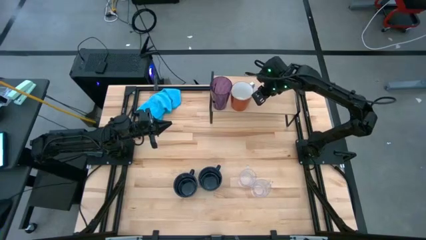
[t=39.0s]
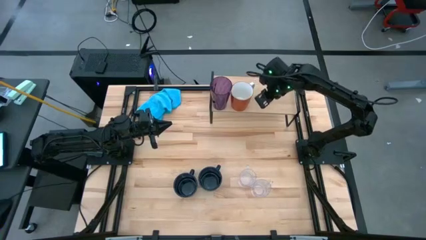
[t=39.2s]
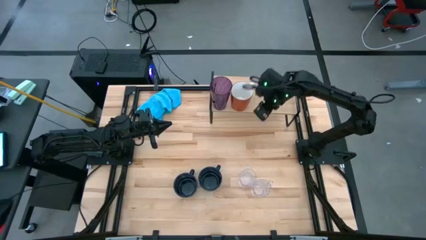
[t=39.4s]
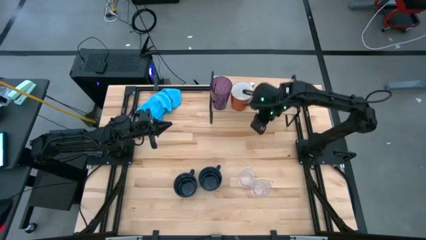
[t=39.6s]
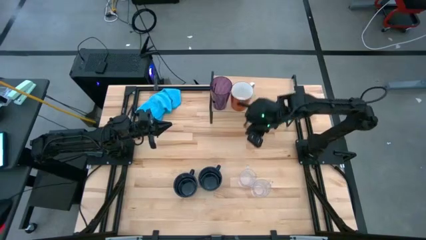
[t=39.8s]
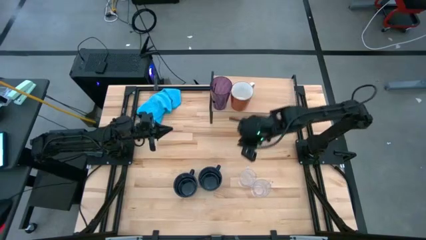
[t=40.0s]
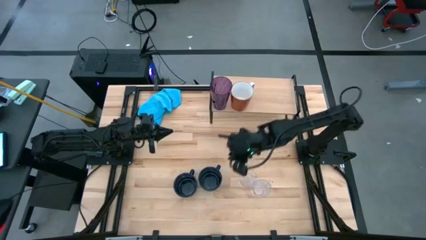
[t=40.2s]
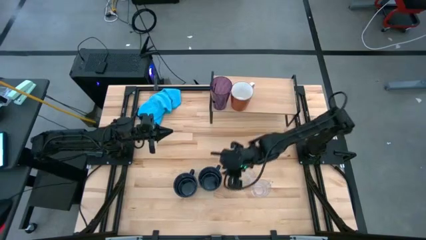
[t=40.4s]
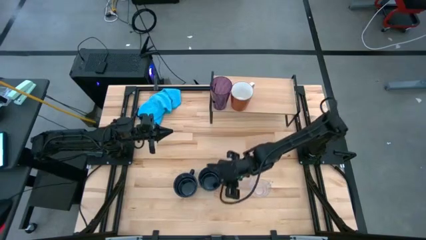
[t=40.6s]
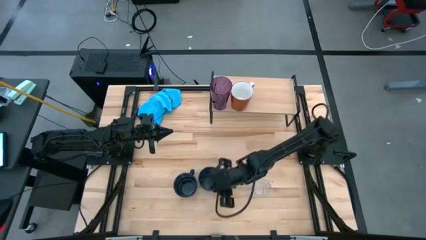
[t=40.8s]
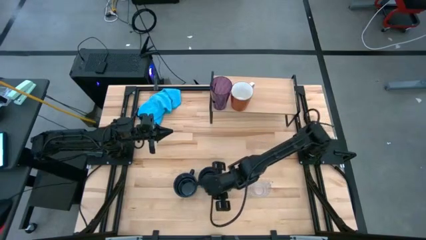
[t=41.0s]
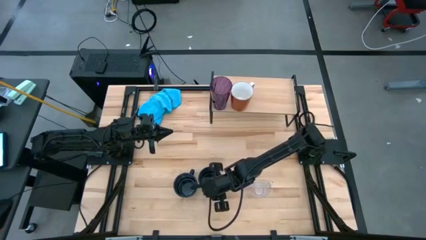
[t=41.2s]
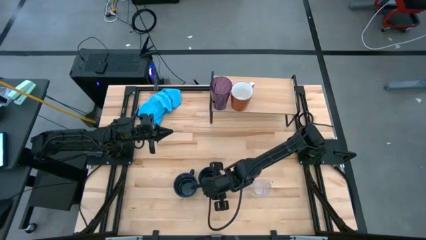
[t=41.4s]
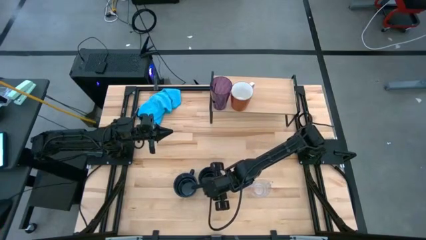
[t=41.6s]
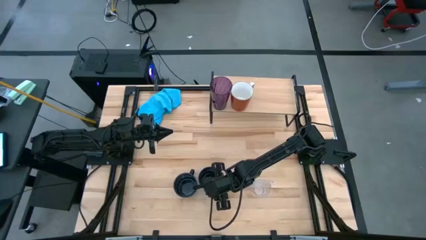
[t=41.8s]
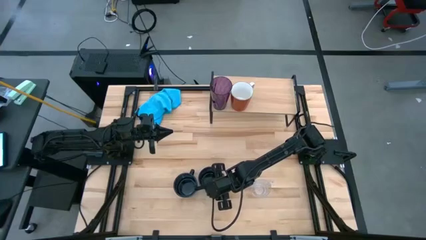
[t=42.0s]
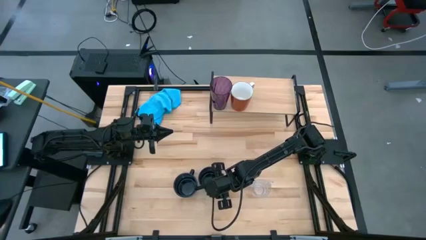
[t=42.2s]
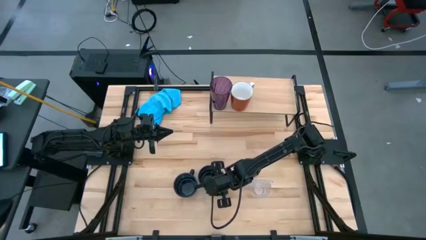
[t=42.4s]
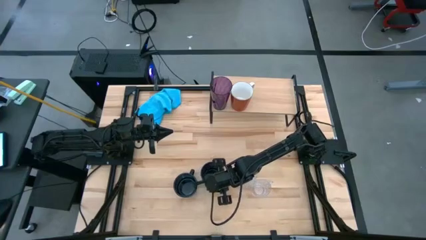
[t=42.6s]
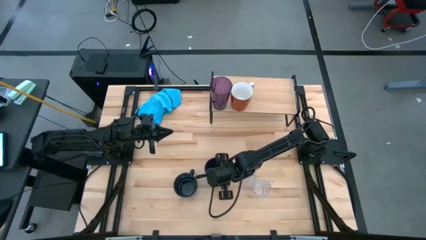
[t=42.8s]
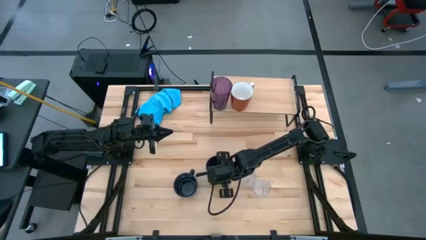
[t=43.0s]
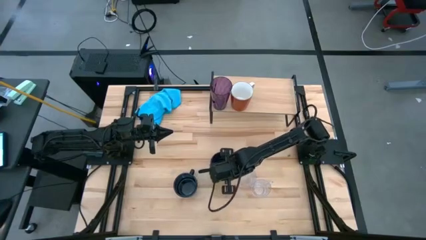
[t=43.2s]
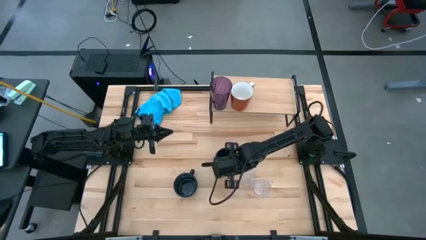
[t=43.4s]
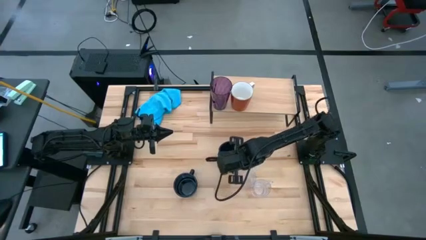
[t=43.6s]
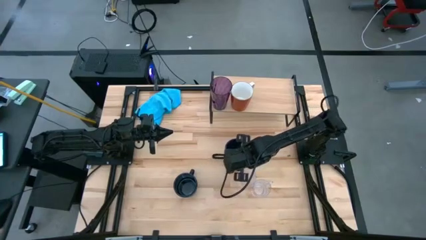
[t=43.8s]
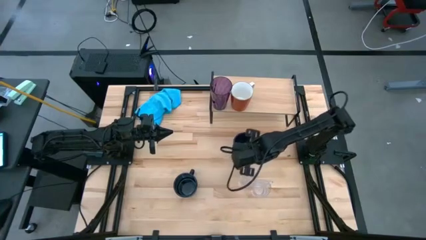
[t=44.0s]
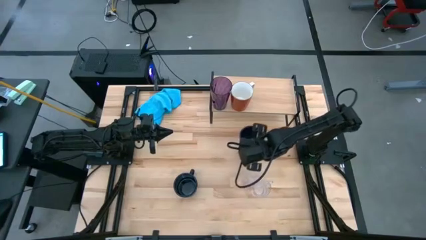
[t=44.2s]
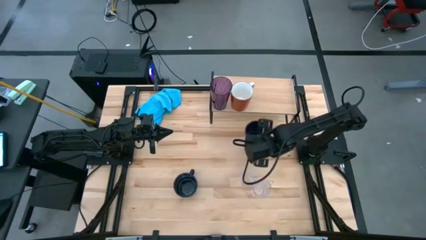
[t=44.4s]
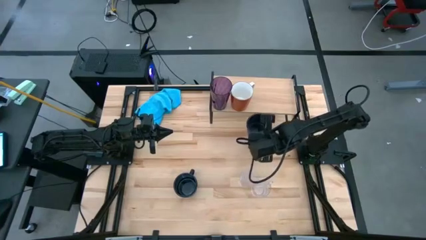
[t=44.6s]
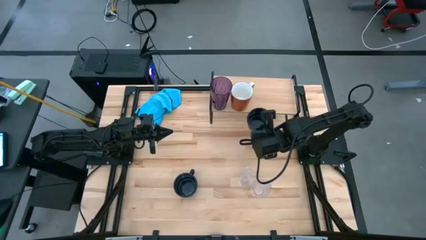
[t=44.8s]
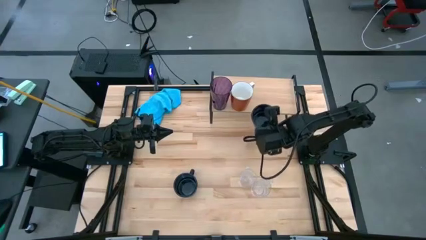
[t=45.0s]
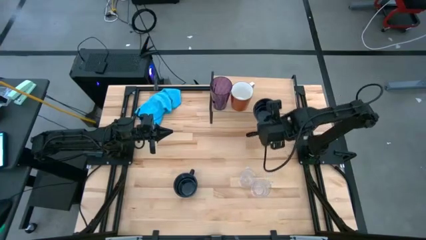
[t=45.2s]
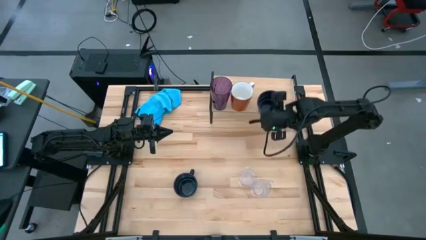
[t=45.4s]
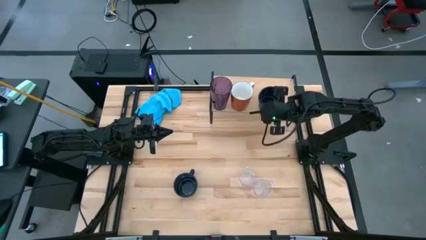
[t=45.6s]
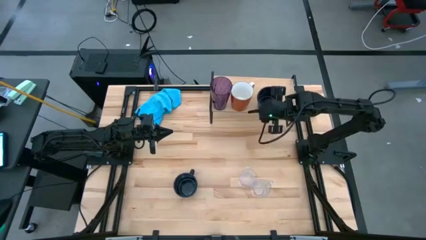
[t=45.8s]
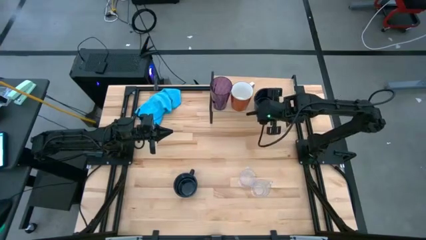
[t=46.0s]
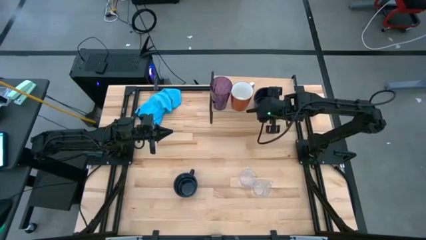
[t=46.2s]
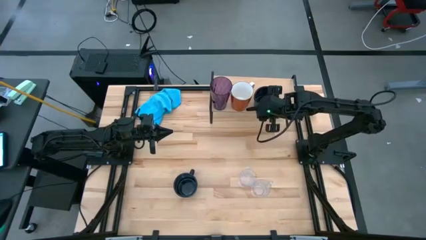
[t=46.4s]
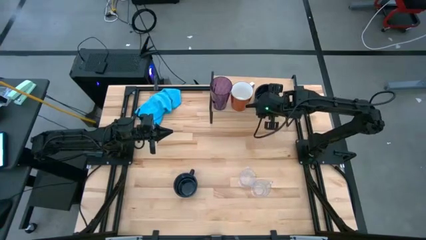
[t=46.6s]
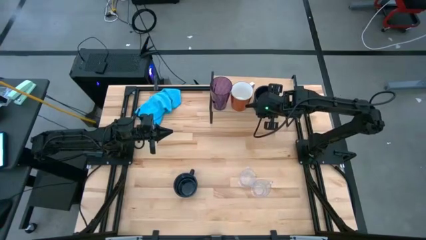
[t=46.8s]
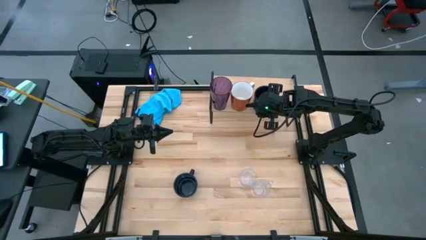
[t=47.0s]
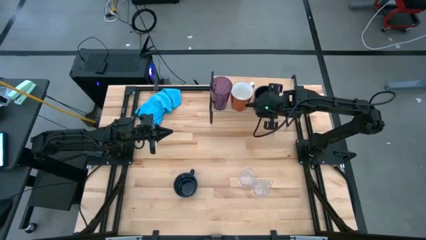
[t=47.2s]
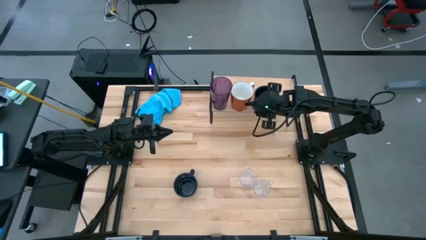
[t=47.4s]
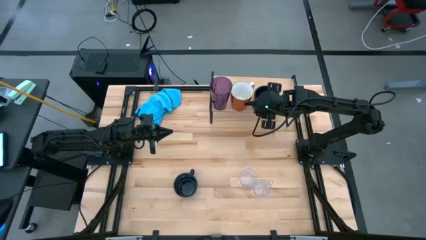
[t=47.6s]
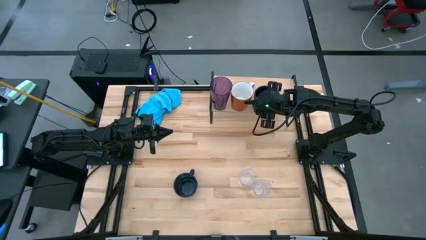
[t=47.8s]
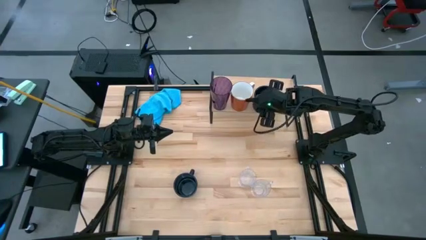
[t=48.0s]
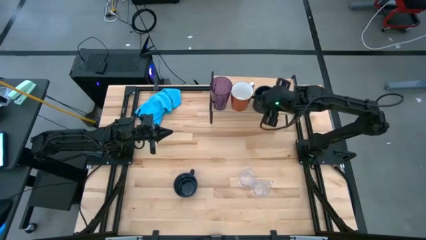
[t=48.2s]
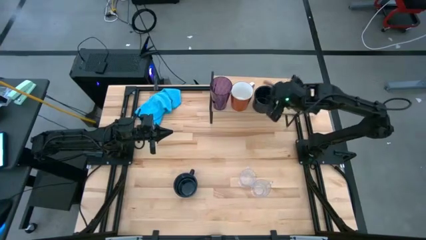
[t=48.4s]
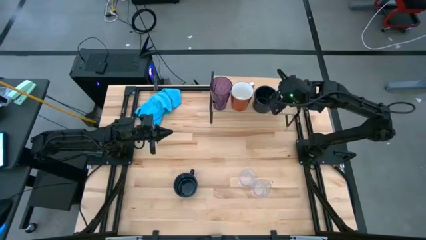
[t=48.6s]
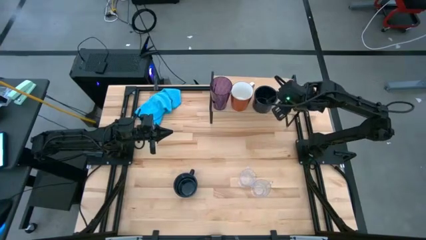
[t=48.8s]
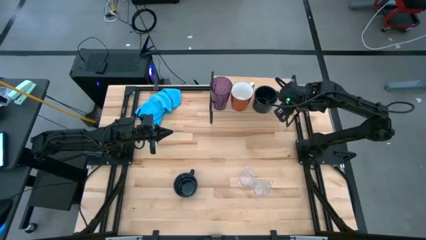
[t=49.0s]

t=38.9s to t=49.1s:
Task: Stack small to large cups/mugs on shelf
Put the right black mug on the shelf

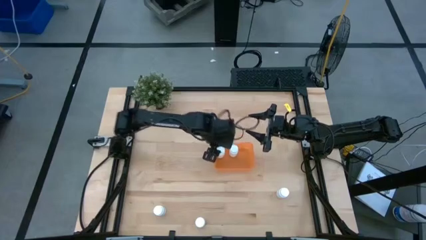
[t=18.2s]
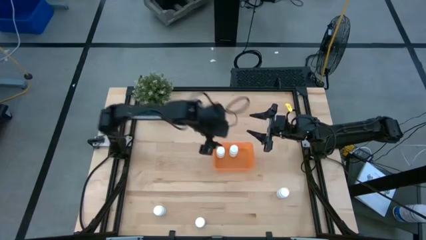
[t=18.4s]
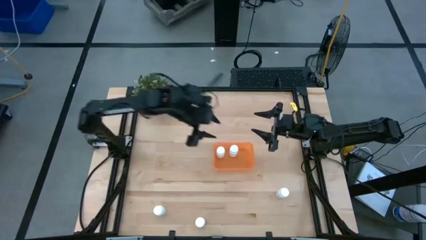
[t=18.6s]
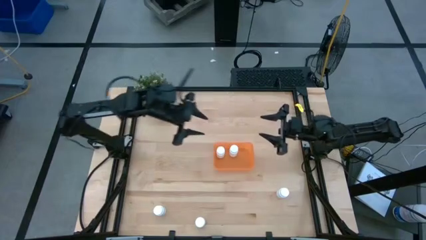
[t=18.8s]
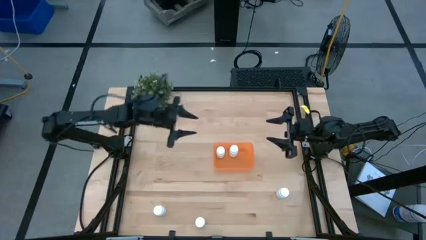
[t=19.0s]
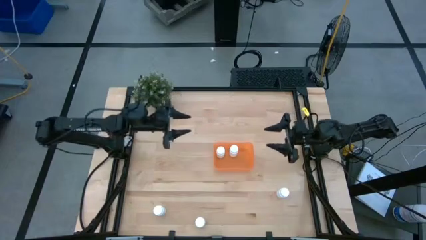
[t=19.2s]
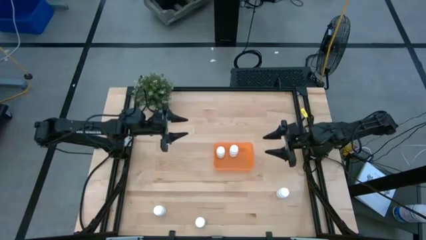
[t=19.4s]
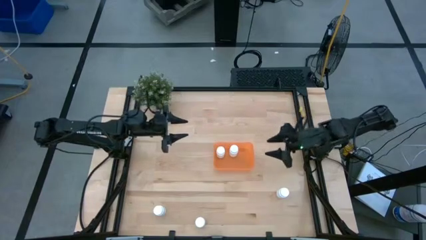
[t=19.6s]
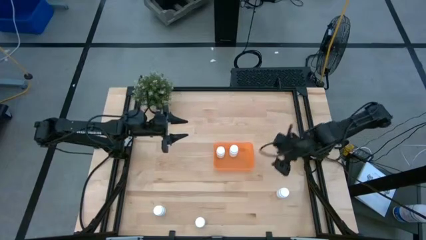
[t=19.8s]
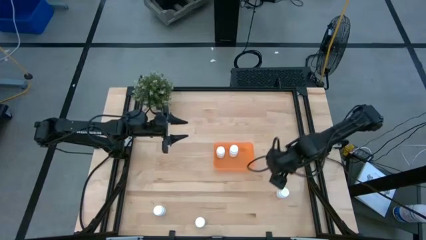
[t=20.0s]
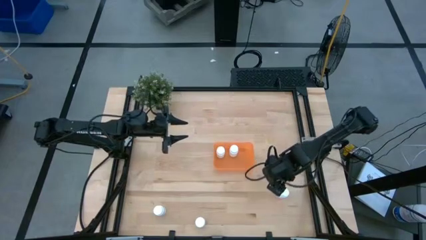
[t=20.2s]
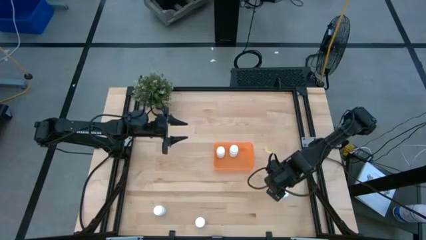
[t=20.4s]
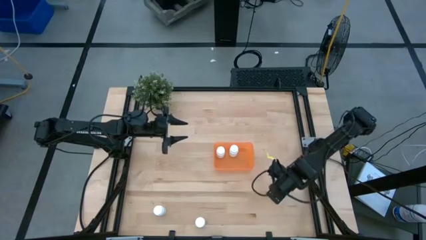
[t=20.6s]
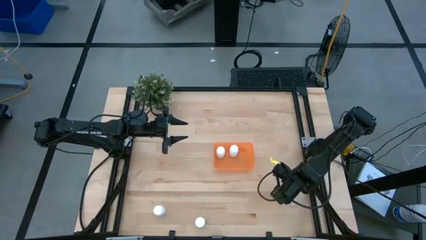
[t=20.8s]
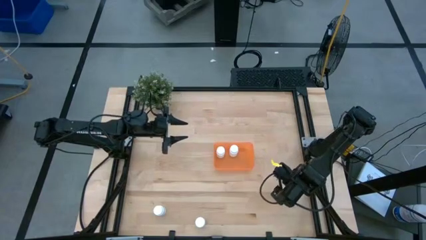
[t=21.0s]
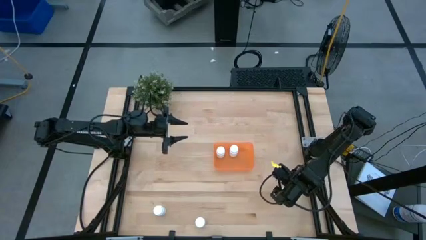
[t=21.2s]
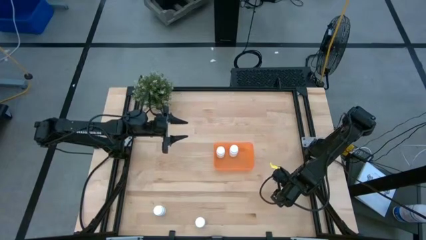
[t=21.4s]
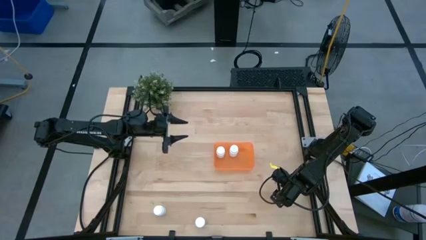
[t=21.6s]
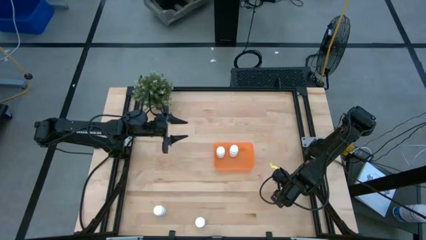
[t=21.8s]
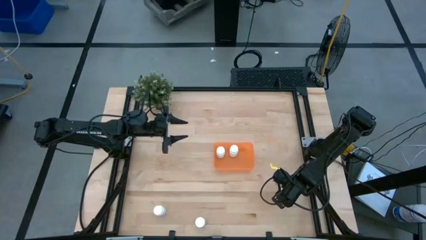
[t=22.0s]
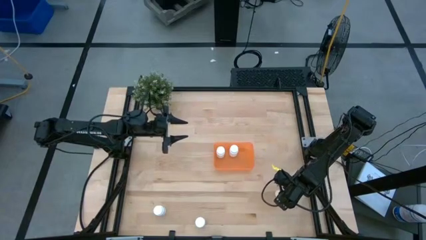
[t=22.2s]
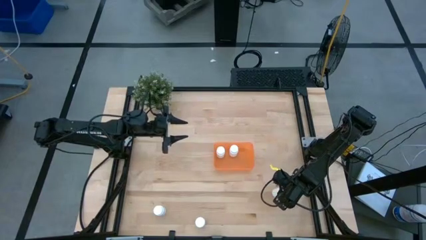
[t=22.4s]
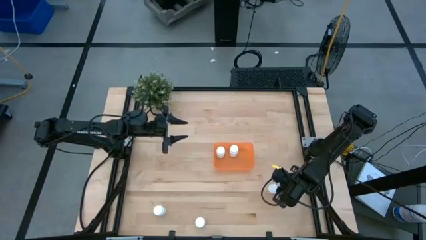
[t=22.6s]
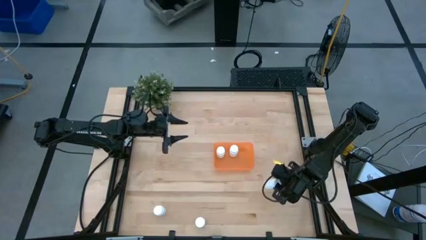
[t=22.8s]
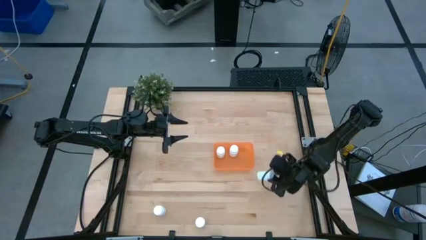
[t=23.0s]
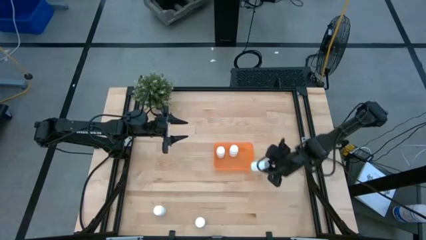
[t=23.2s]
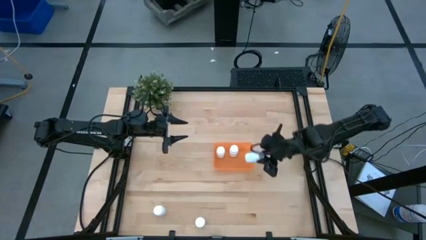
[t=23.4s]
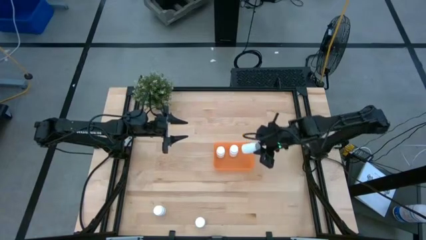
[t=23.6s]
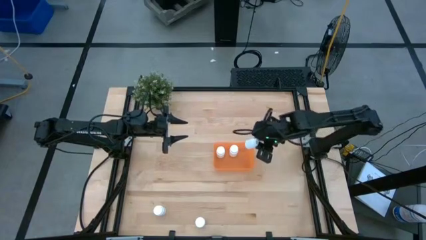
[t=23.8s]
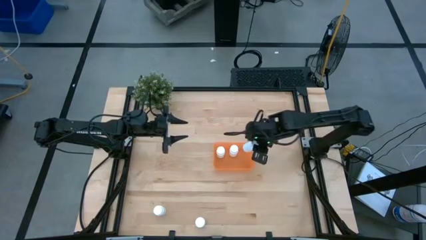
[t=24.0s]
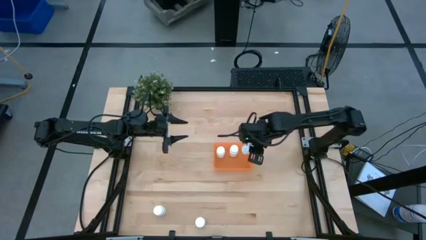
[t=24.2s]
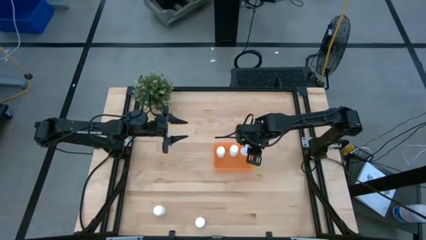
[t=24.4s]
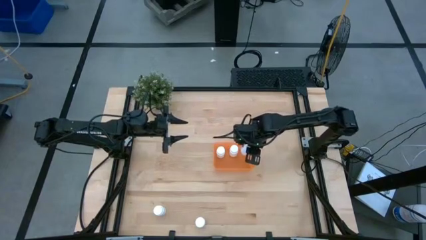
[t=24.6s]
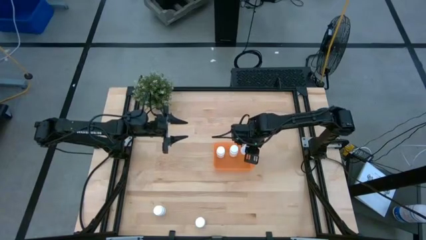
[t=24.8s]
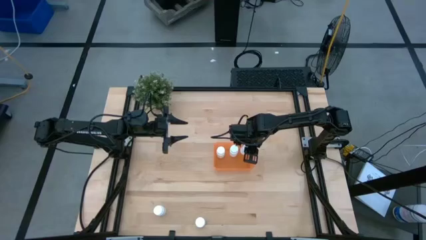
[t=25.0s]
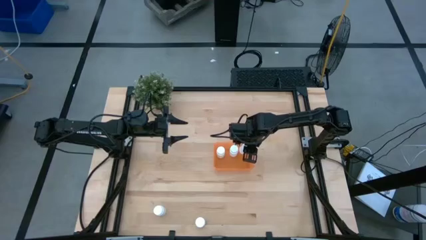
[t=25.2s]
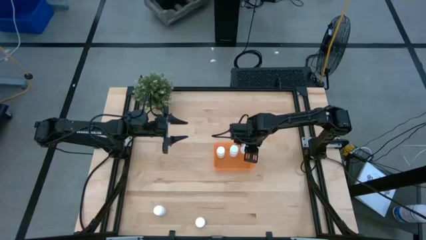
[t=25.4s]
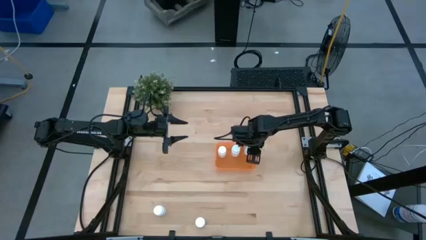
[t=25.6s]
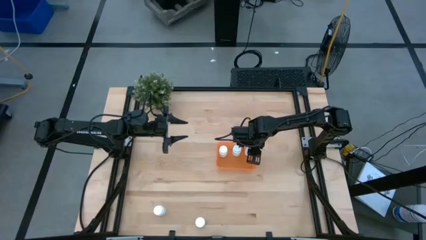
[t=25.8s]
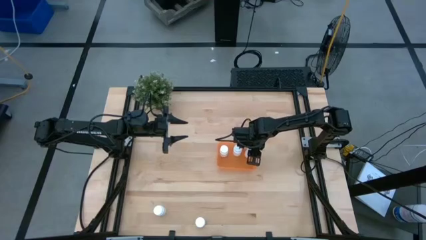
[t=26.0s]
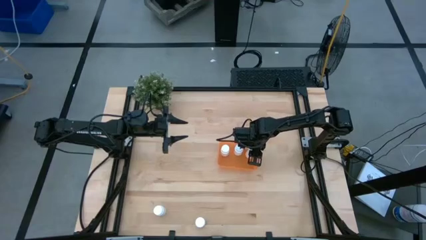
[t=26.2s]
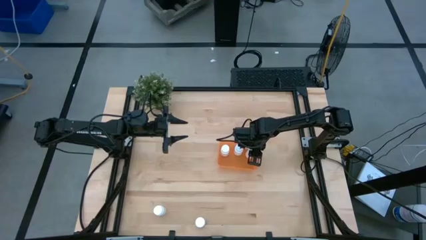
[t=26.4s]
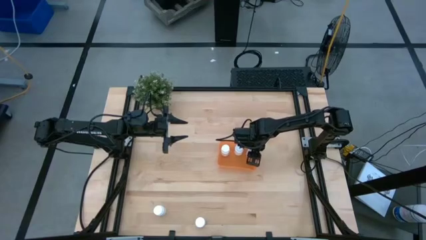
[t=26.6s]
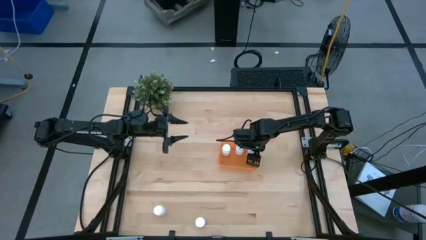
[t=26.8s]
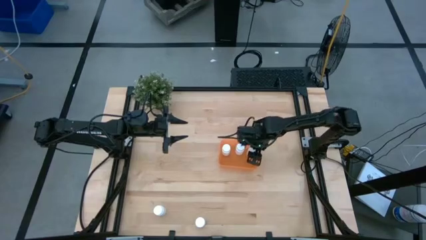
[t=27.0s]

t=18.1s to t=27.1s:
Task: Pick and place pill bottles into a basket
Put the pill bottle into the bin
